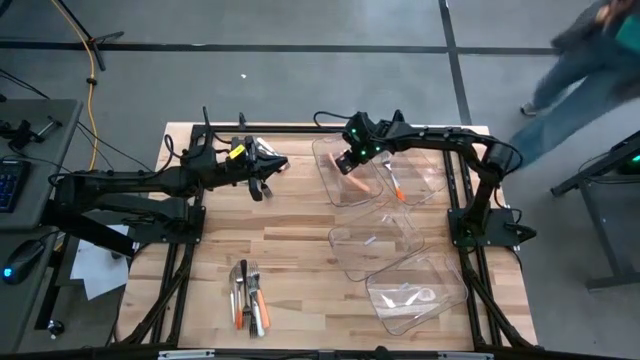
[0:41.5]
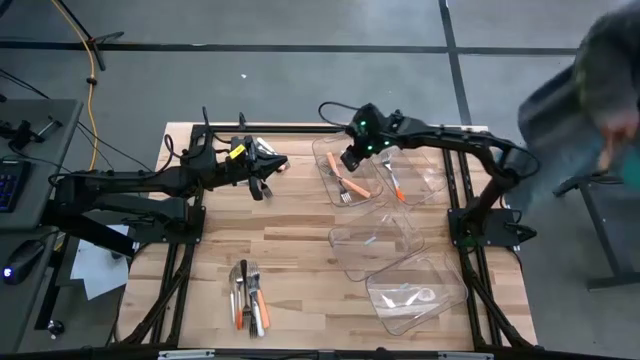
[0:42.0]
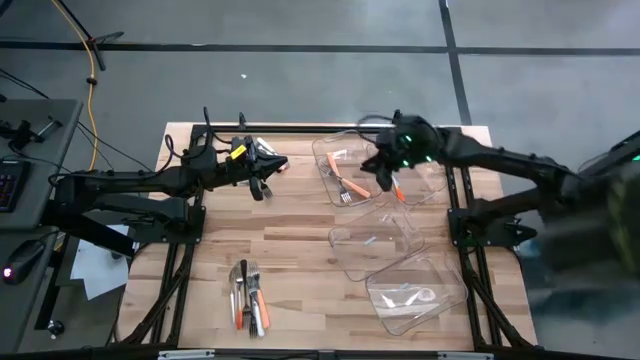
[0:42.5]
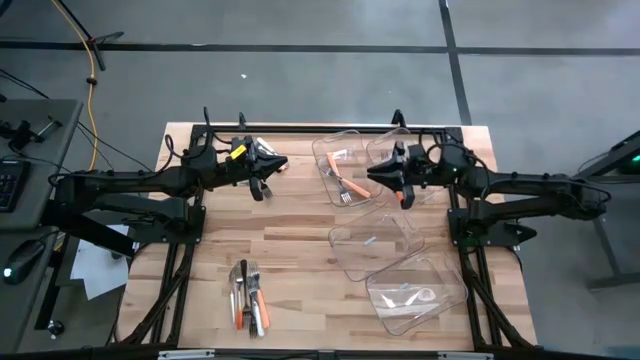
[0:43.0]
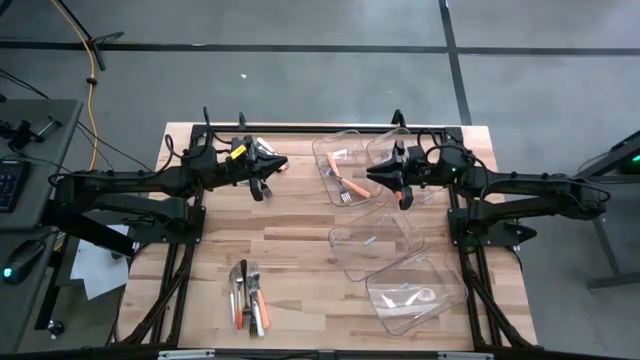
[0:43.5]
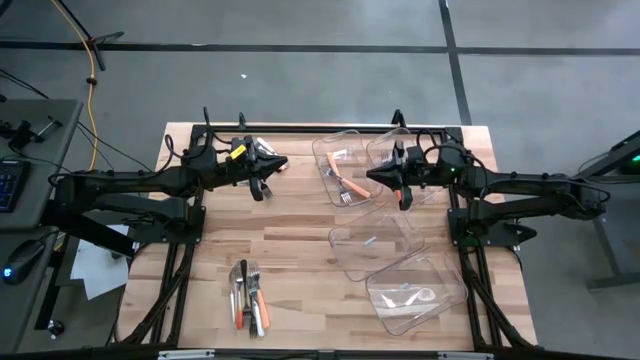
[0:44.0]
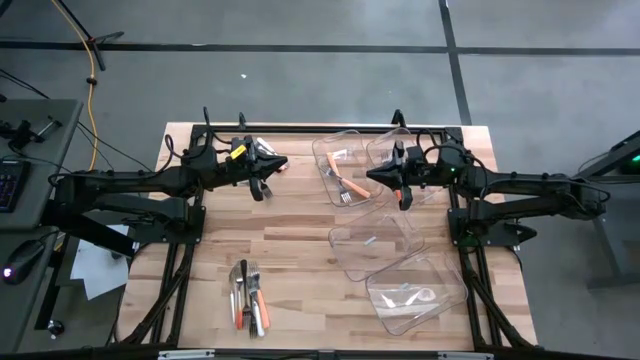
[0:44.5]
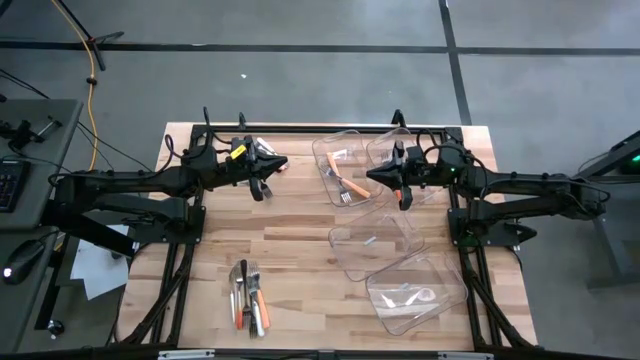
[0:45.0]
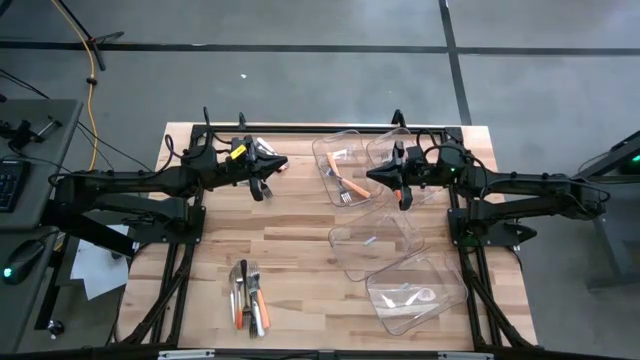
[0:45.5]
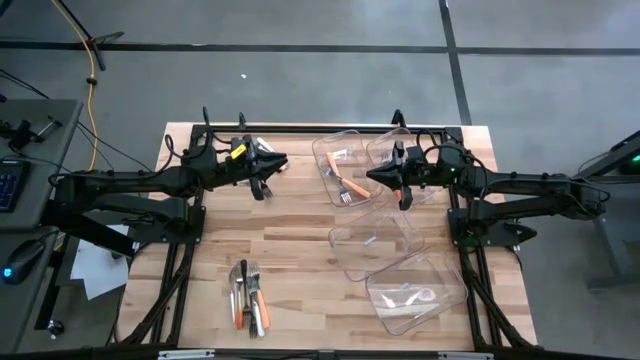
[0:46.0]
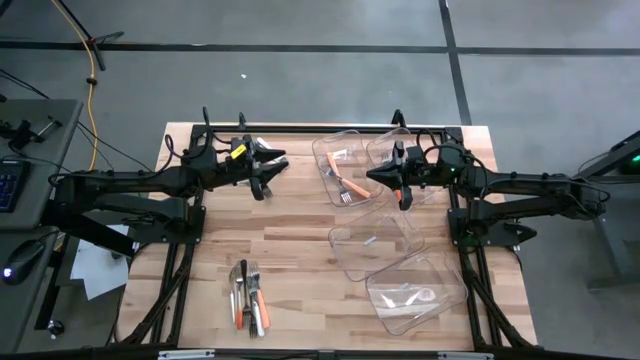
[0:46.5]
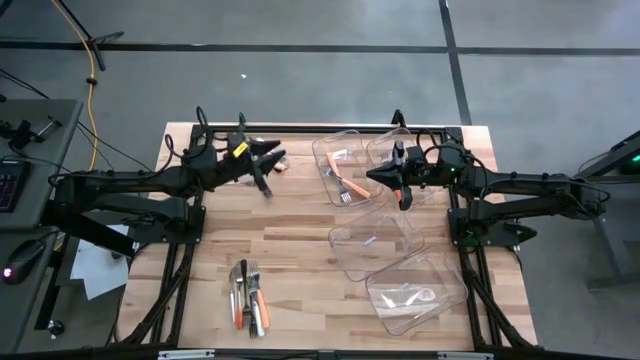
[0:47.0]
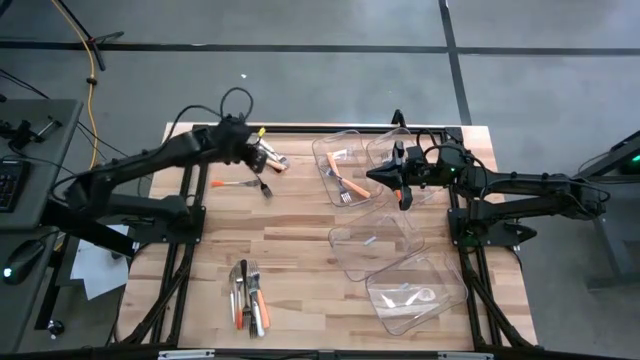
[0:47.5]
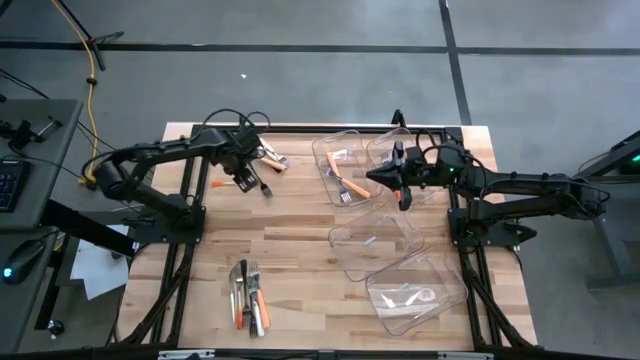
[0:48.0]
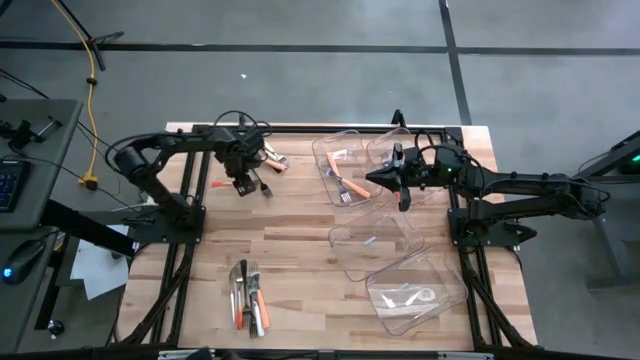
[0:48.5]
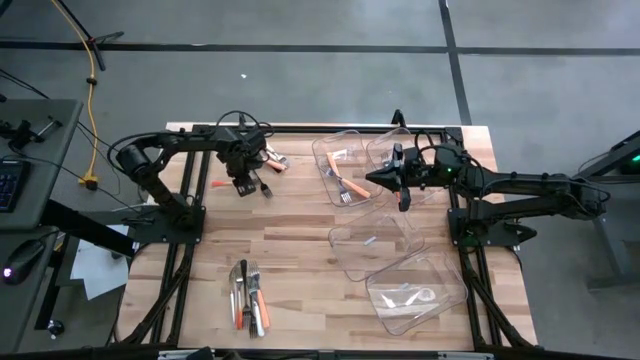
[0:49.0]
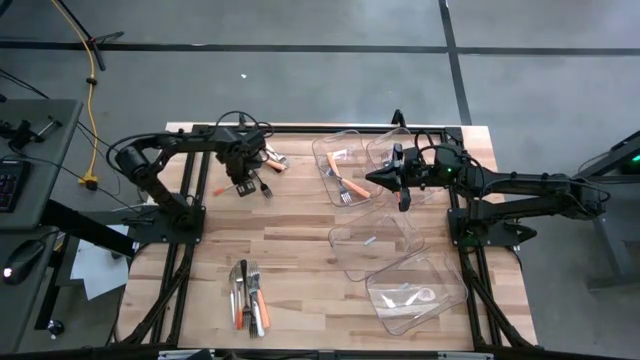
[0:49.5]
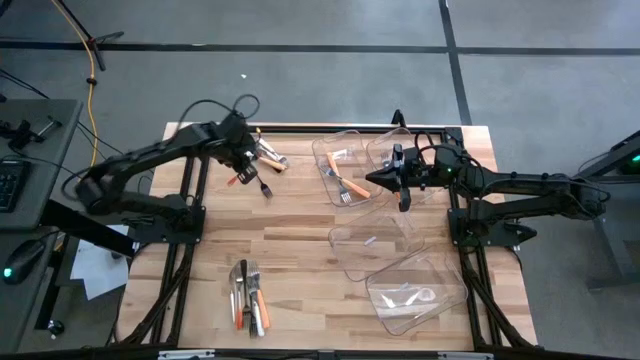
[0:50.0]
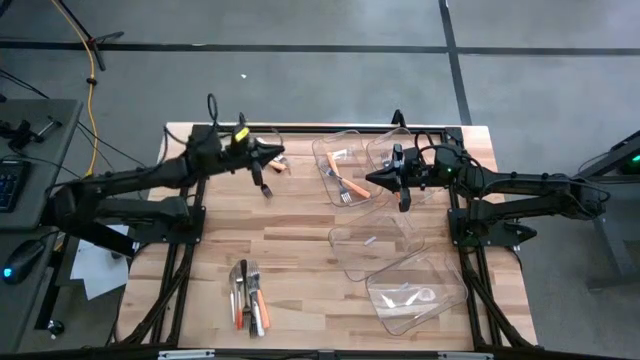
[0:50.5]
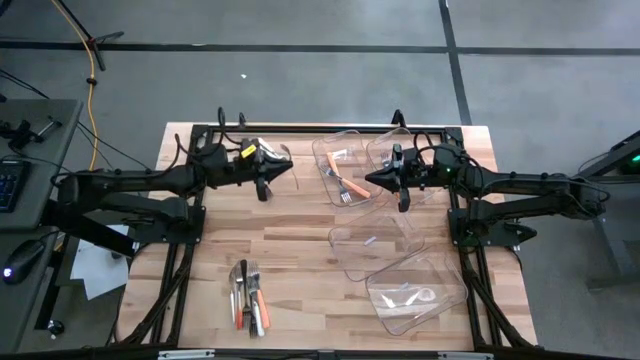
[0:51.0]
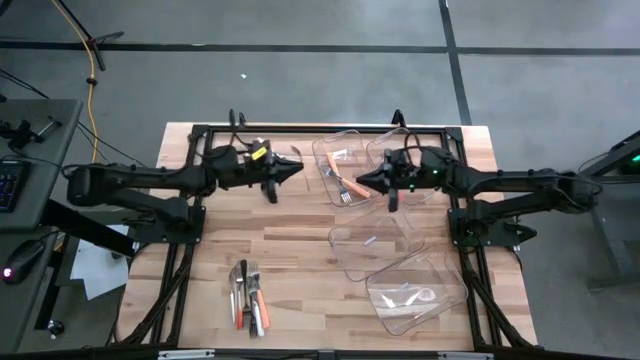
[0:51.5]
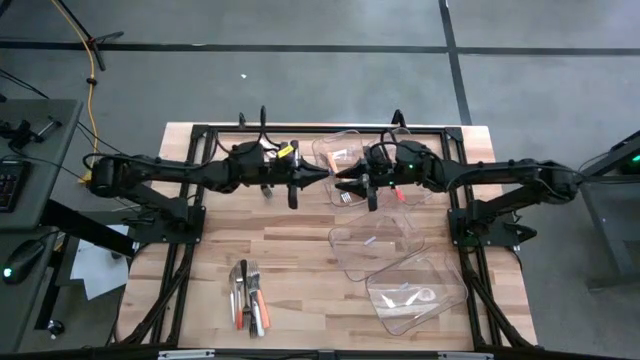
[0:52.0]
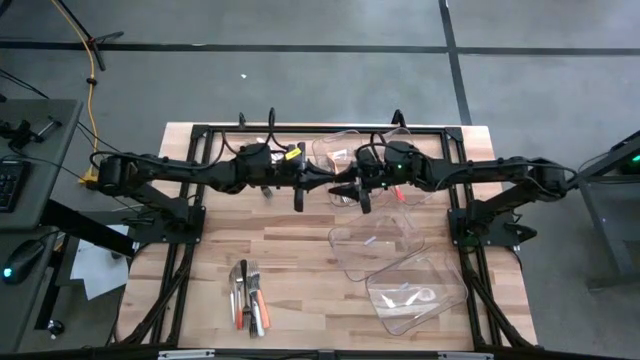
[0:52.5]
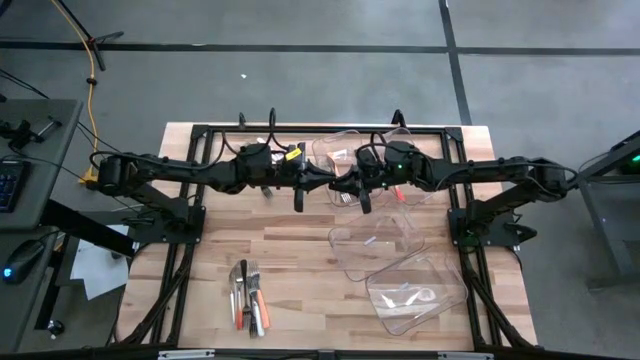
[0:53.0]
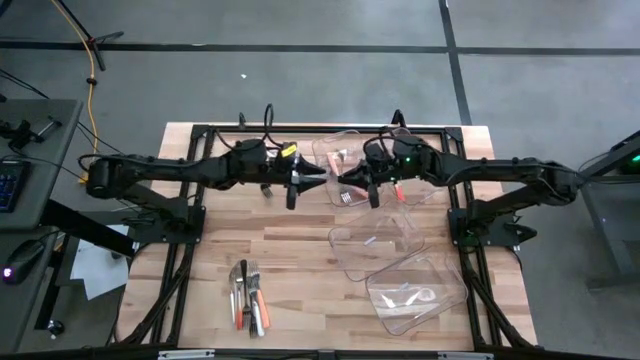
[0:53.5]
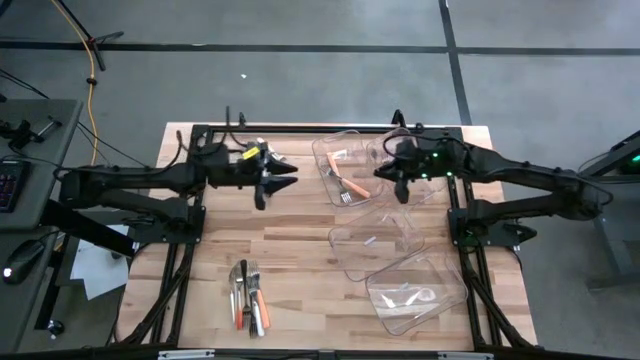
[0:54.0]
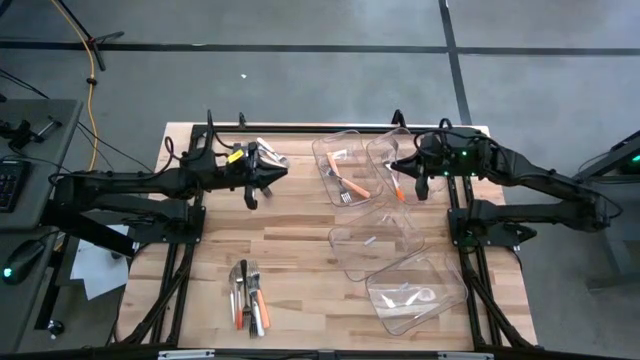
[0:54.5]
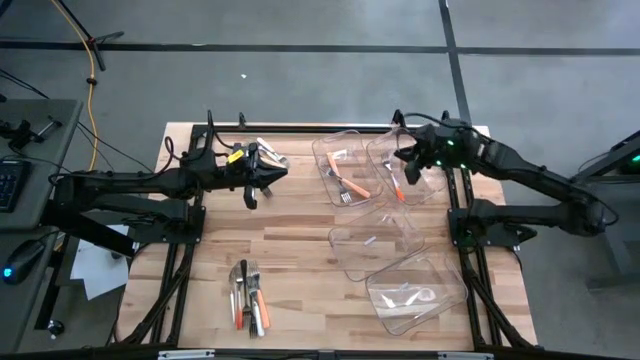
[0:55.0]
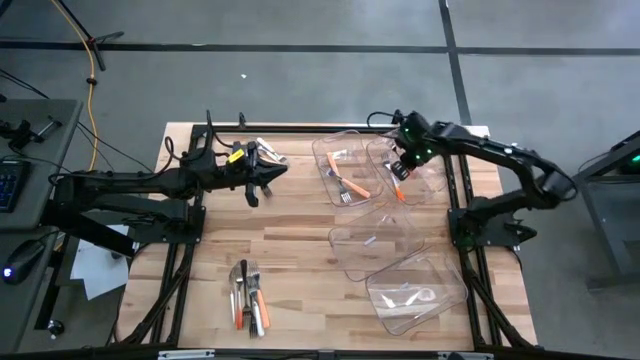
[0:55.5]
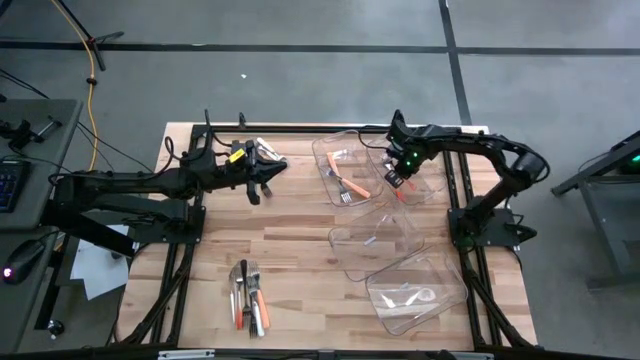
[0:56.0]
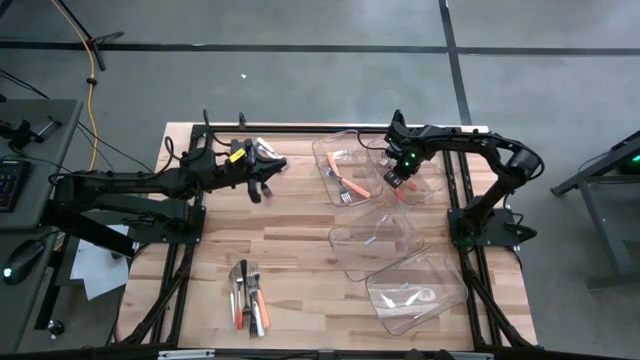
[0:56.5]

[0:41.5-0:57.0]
Task: Sort silverware by color (type)
Put the orange fork into the right transparent bin

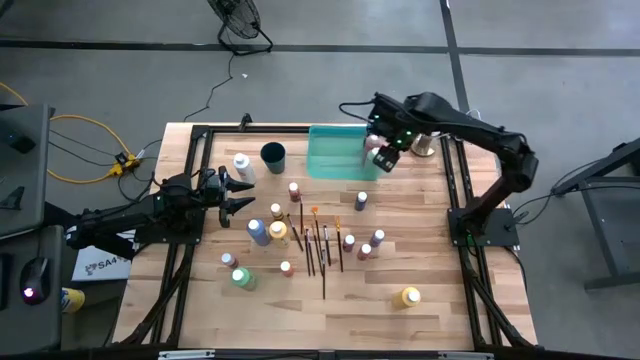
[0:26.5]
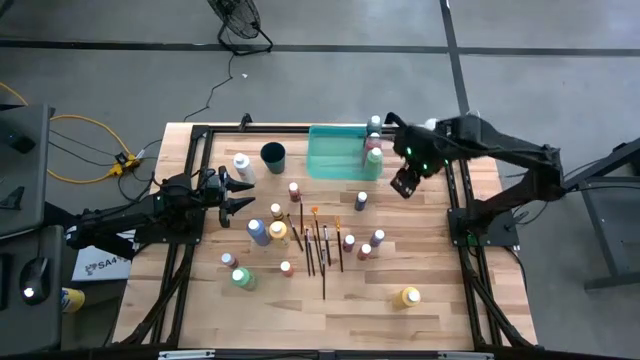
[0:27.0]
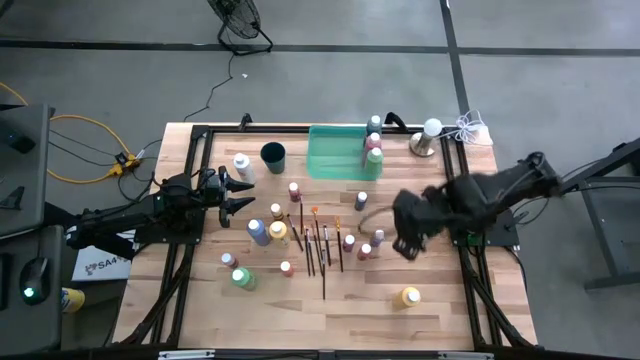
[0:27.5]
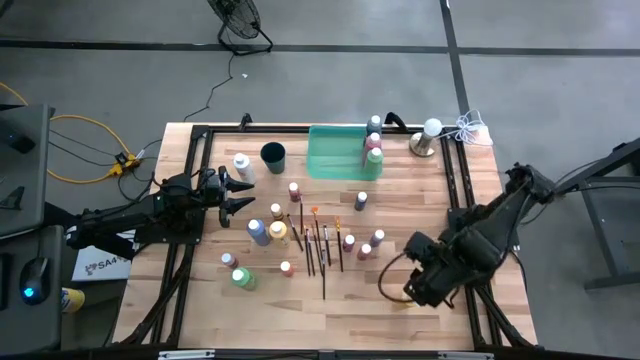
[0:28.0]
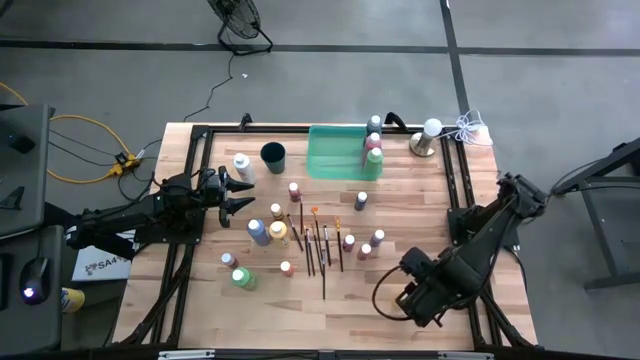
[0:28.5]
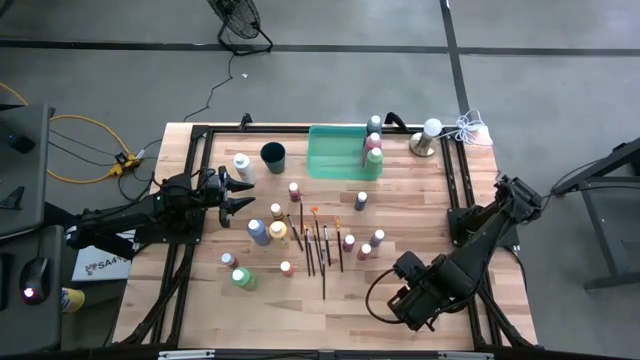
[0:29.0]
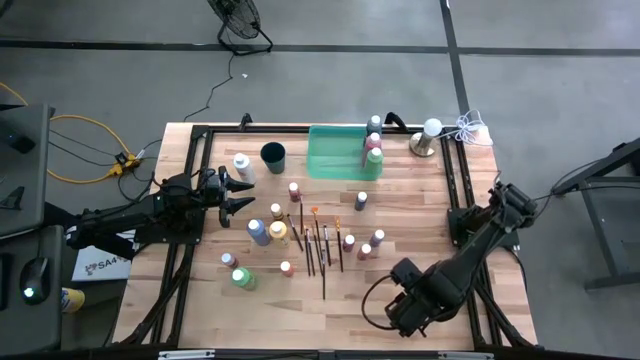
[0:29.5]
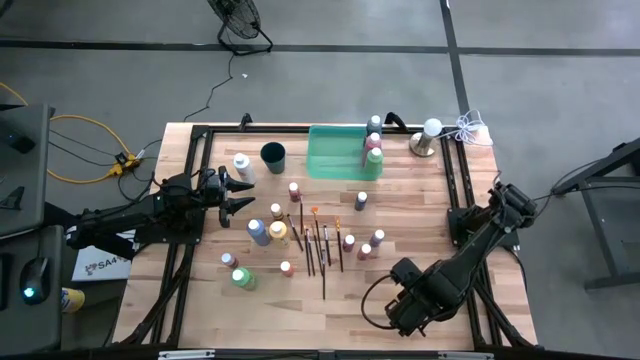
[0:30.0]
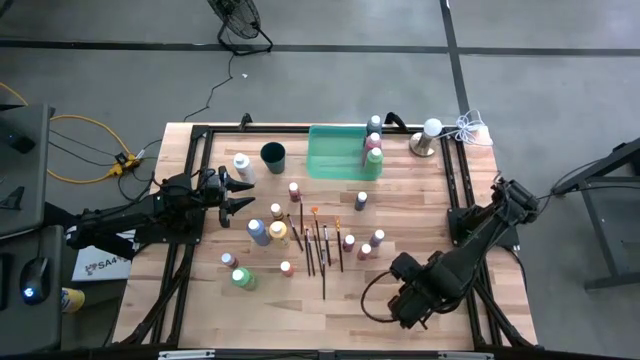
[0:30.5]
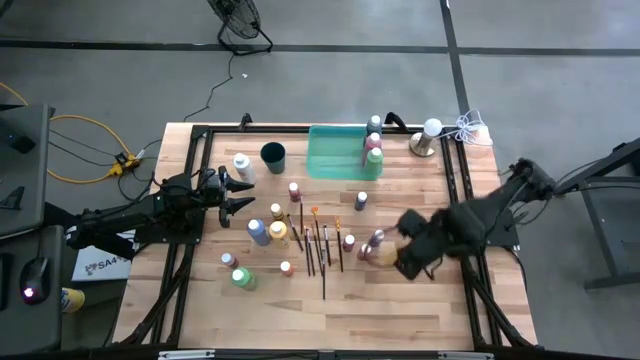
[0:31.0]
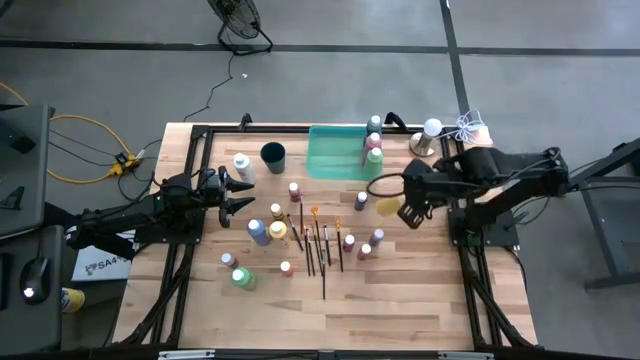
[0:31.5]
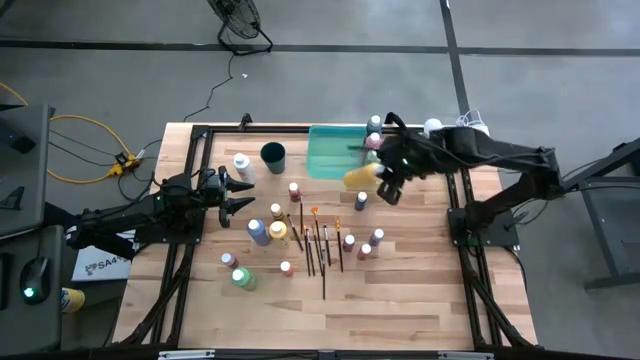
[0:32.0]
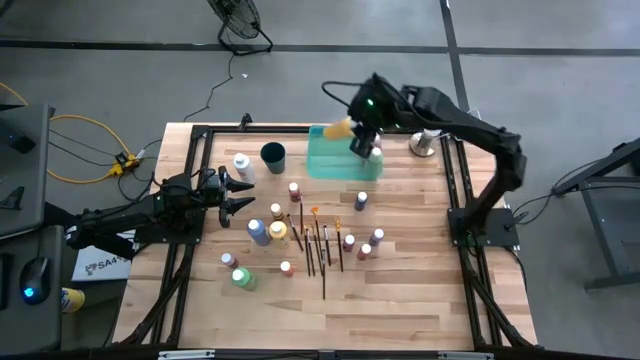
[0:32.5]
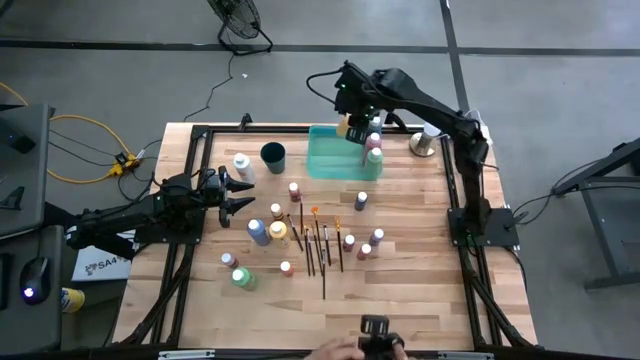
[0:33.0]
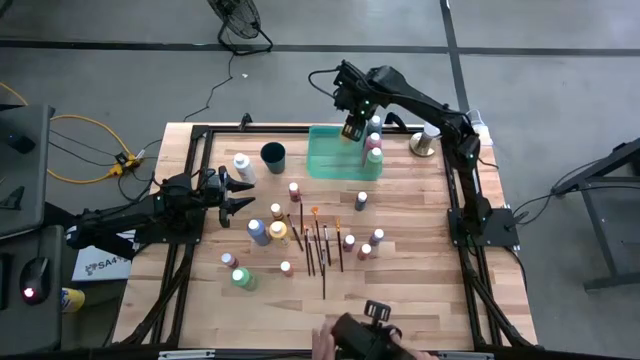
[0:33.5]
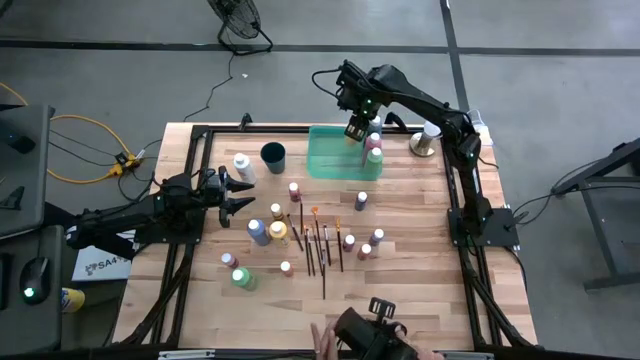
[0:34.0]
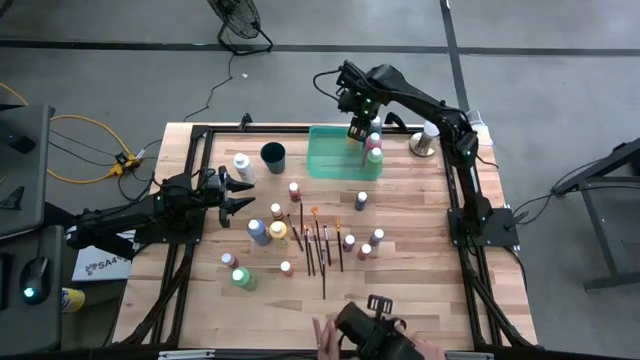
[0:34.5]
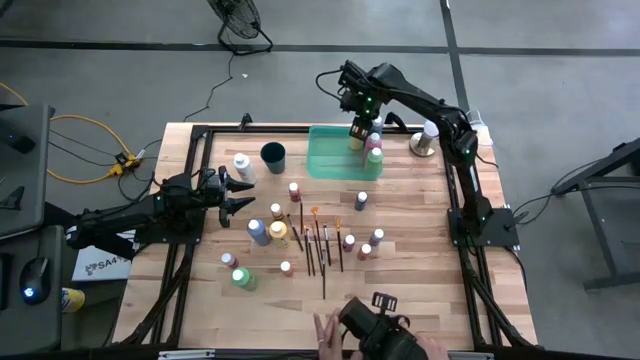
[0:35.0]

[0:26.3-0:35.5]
Task: Pick & Place Paint Supplies
Put the large yellow paint bottle into the green bin
